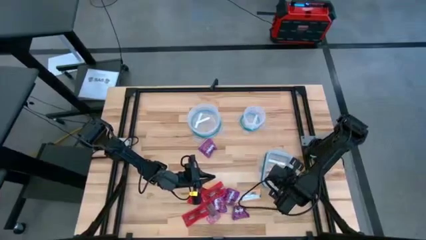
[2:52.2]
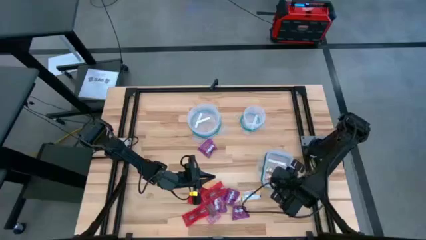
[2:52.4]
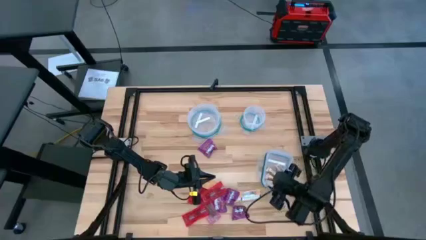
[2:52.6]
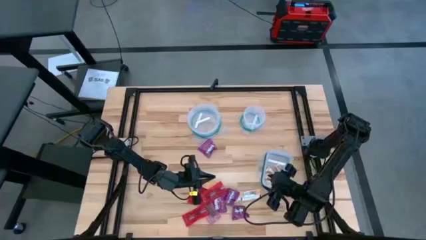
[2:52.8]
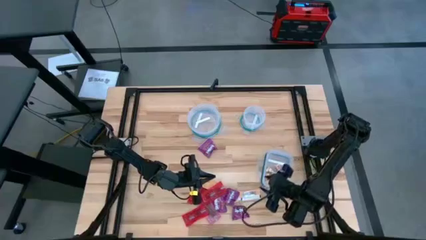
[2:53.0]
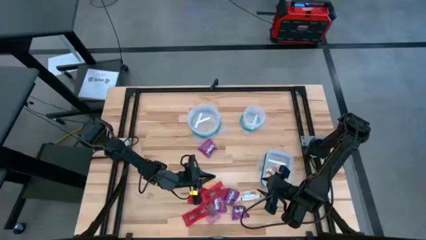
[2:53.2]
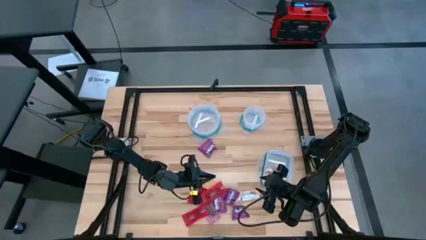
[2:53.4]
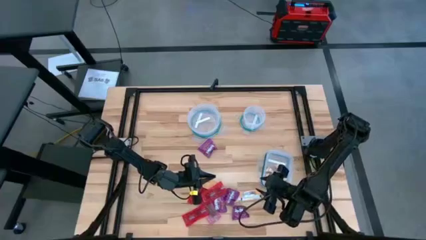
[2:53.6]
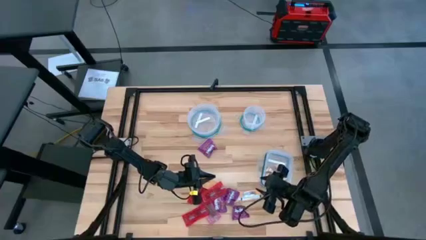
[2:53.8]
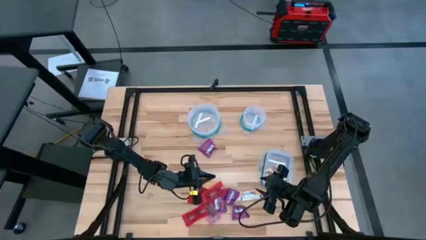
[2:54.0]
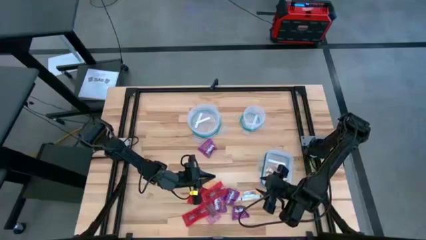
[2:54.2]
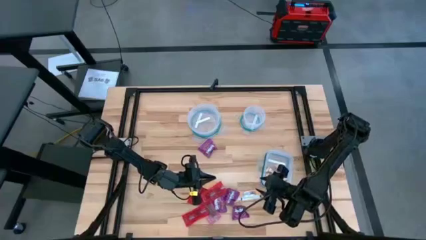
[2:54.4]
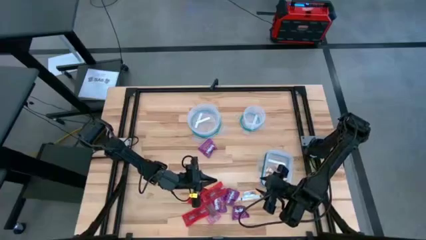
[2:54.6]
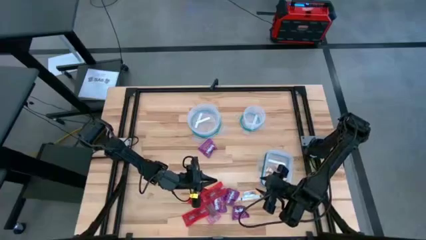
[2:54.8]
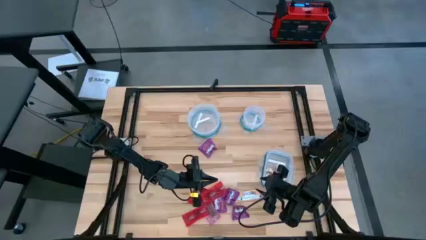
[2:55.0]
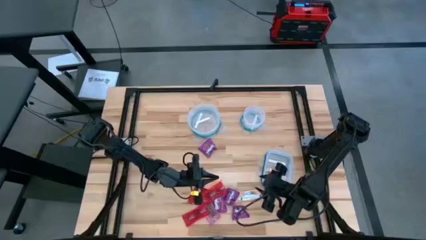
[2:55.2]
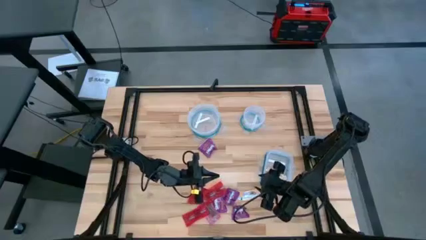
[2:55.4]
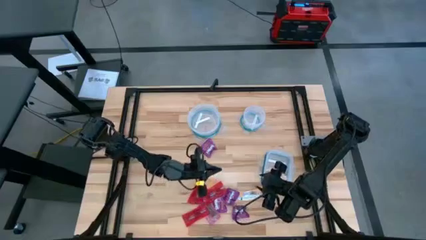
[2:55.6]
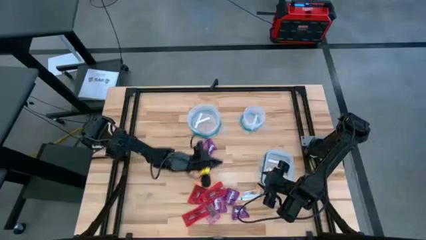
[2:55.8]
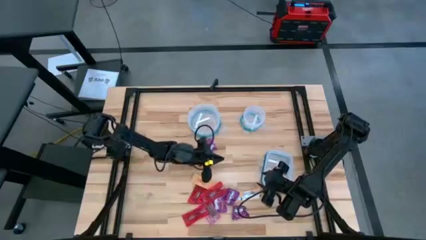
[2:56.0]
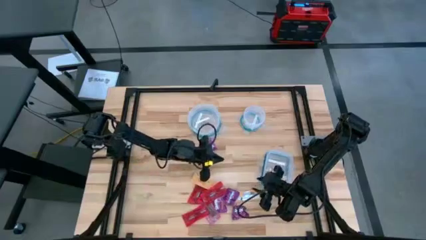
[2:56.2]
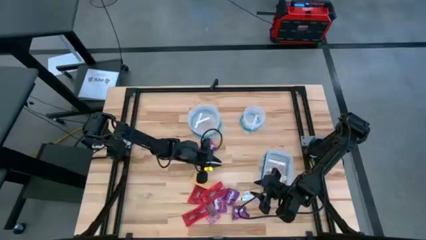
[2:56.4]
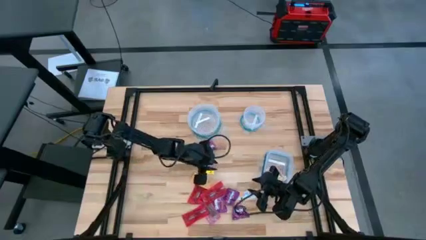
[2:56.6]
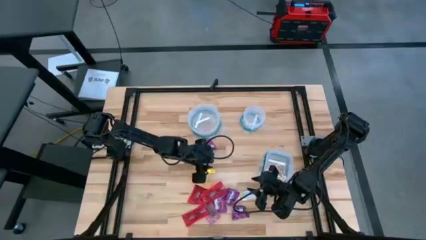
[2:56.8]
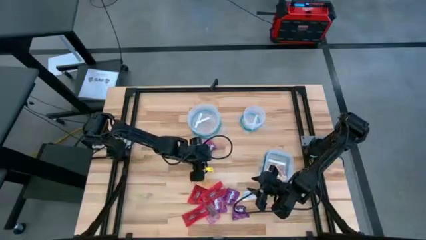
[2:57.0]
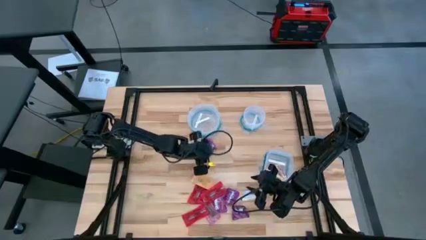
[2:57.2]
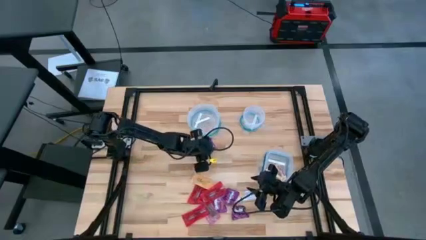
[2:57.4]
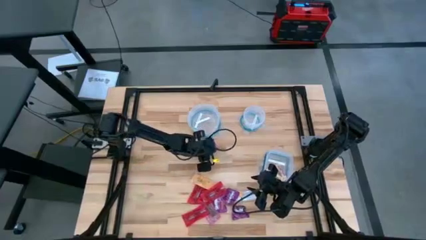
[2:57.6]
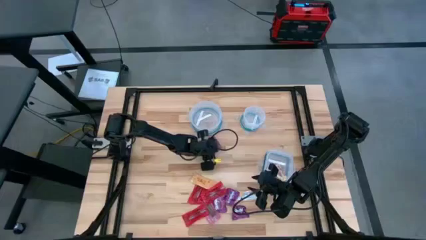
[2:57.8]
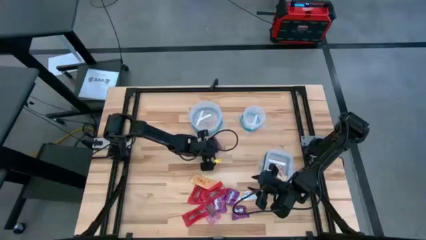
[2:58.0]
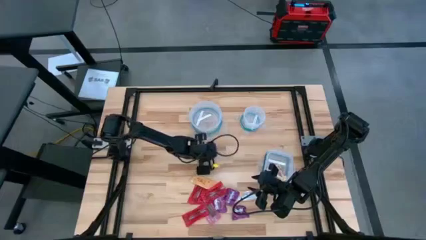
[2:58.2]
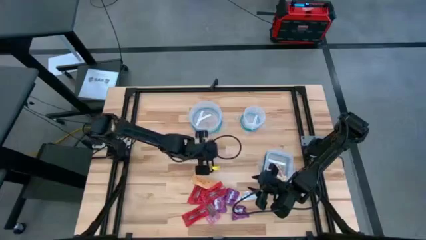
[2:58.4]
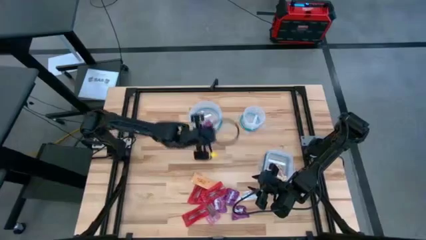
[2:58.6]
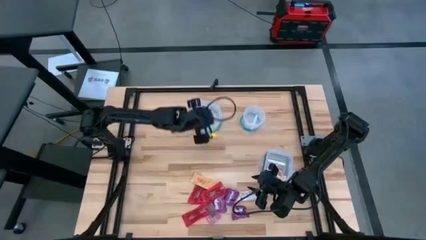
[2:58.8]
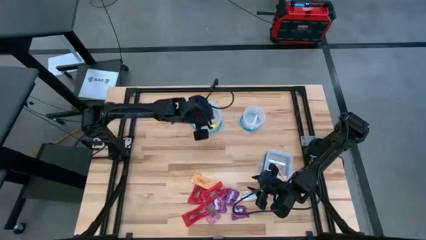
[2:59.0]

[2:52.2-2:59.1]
Task: Sort candy
Put the violet candy into the big circular transparent bin

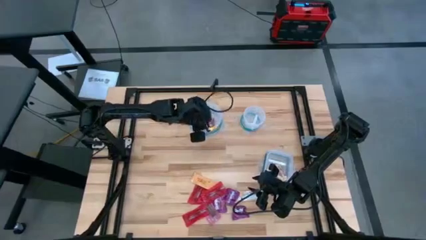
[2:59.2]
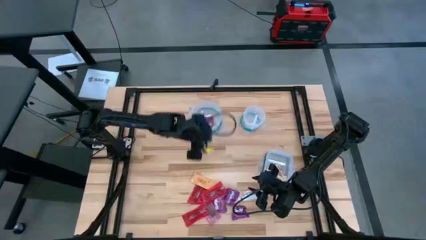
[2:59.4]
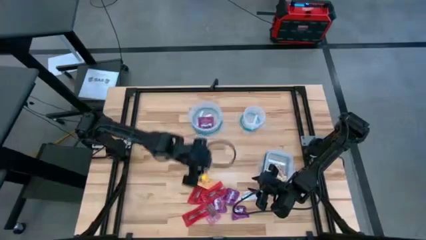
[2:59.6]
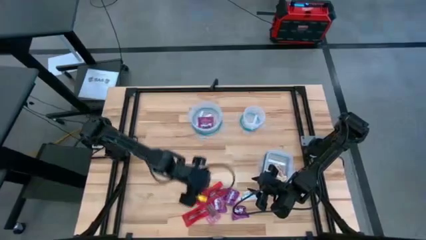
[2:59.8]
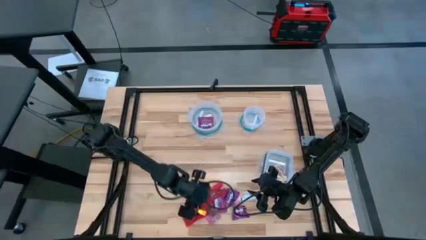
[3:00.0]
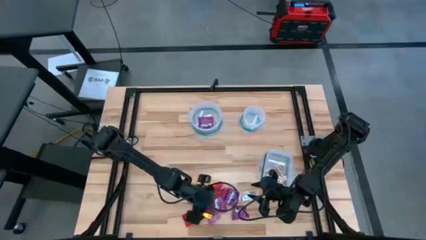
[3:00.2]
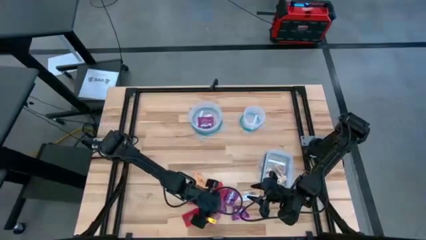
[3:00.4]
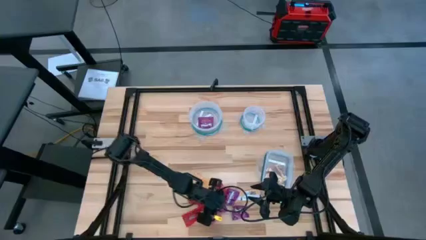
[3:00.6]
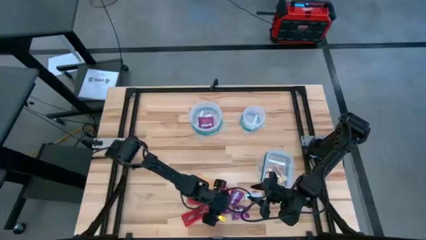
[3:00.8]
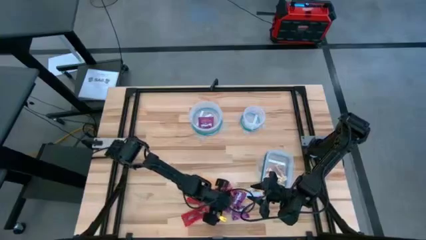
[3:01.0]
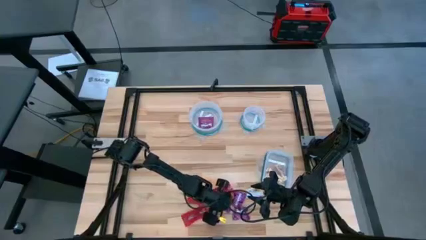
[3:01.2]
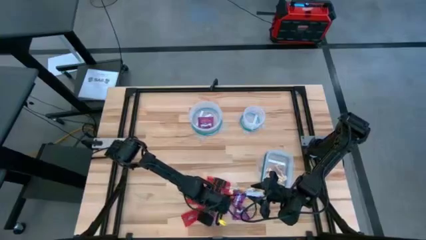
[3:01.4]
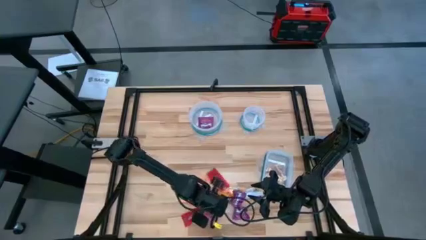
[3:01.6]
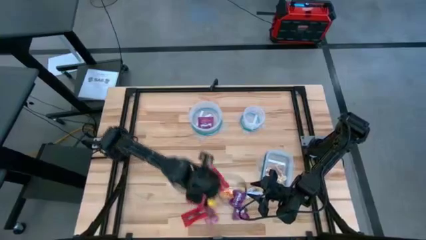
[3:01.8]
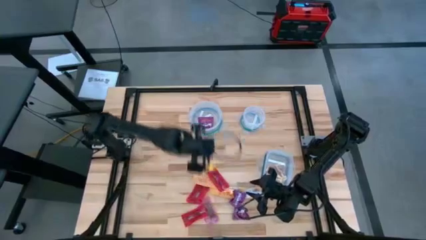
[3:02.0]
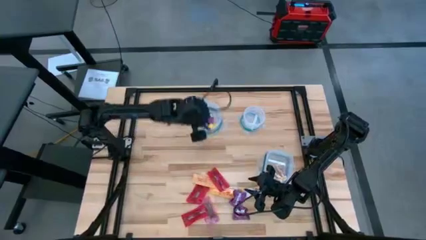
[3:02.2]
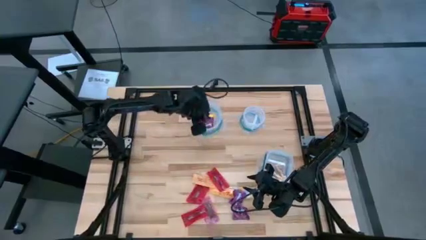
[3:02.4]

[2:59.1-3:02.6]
Put the violet candy into the big circular transparent bin

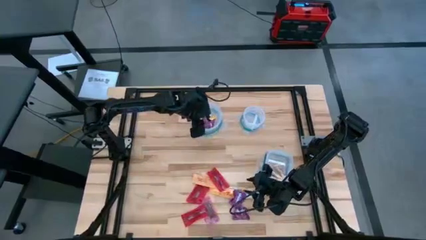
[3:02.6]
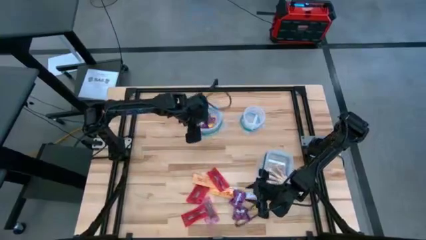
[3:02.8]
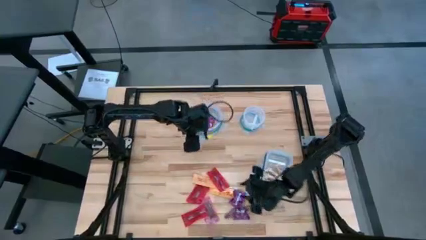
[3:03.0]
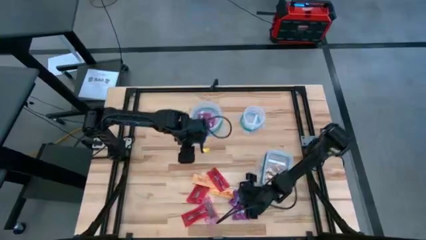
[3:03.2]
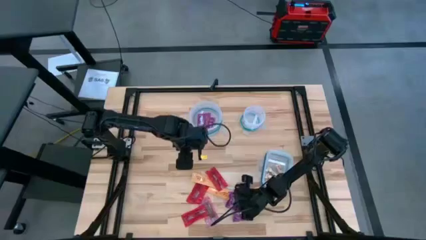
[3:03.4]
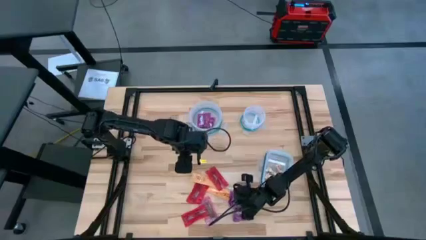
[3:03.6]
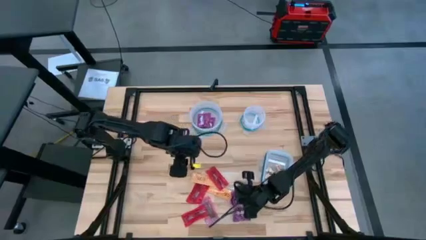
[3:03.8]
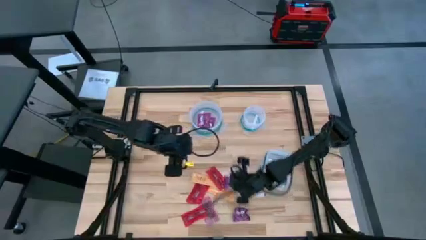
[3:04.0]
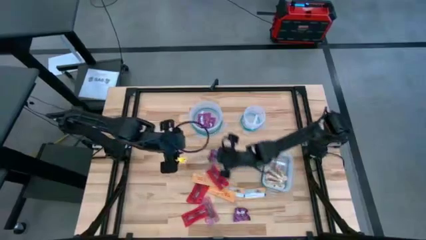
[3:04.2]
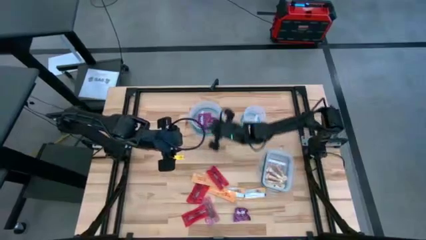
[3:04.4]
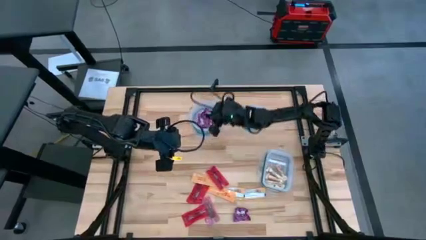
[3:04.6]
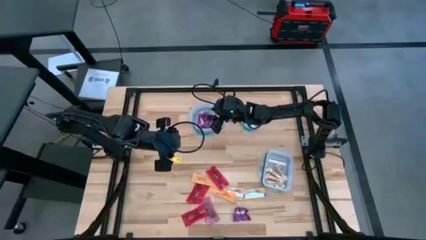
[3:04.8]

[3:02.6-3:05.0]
Put the violet candy into the big circular transparent bin

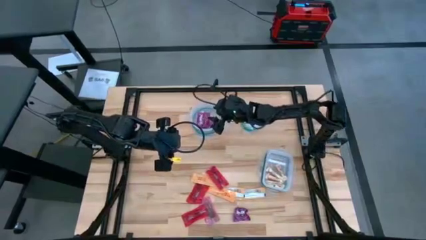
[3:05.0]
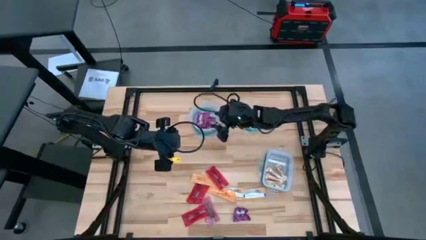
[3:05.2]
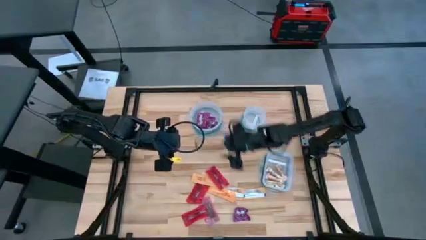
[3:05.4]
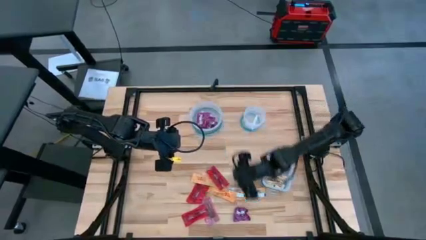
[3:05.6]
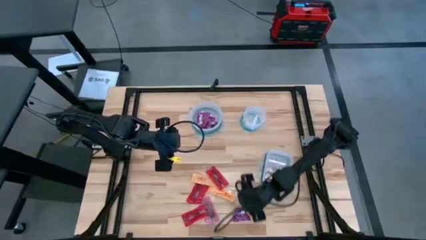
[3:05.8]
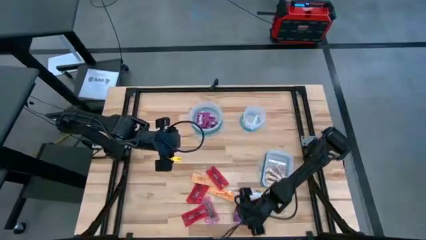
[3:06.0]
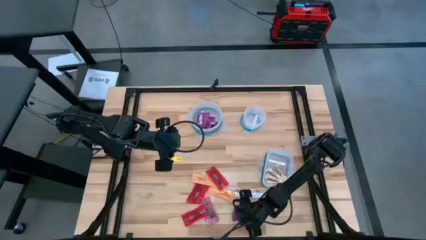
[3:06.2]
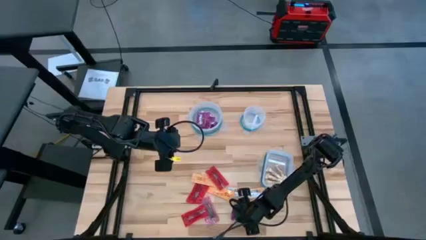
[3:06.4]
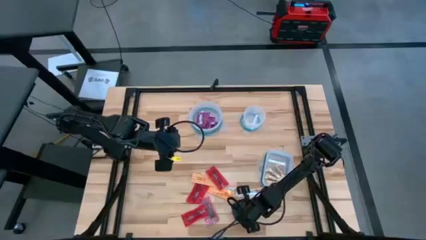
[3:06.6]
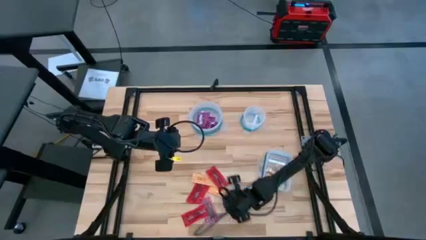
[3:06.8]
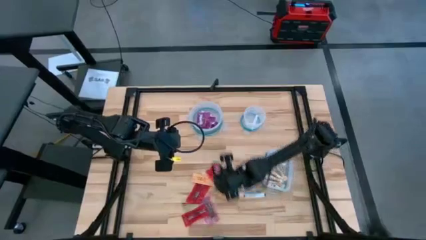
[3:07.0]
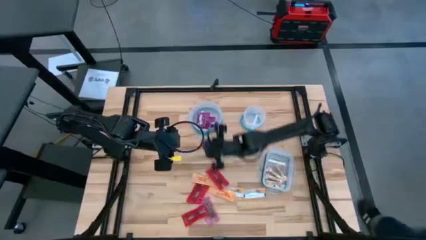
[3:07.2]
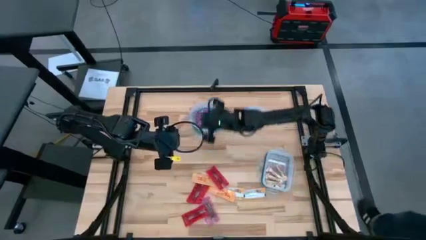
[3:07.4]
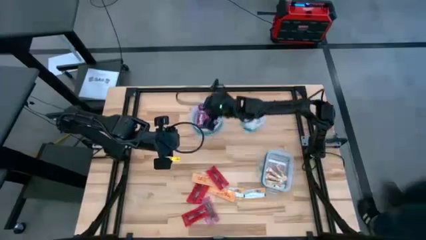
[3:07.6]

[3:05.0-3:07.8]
Put the violet candy into the big circular transparent bin
